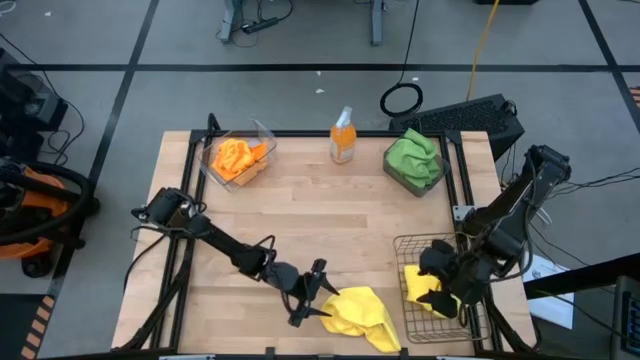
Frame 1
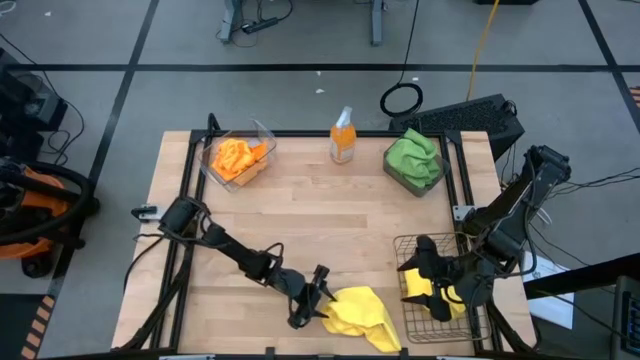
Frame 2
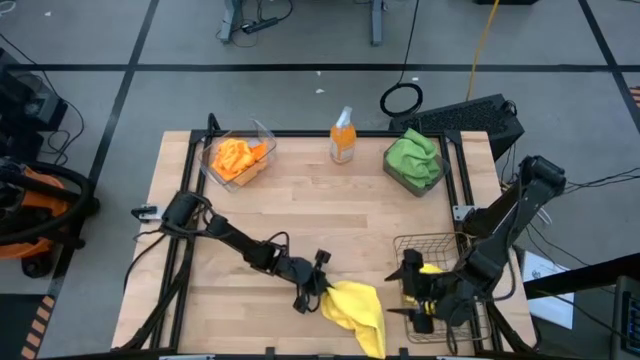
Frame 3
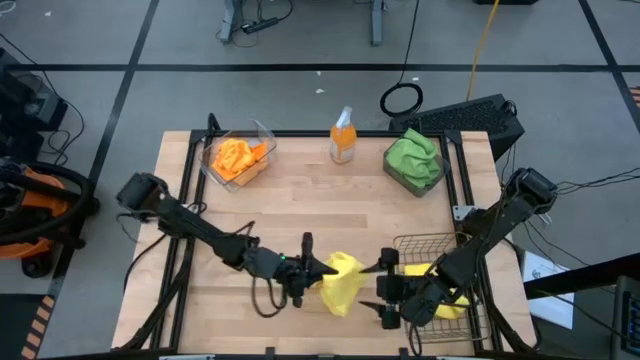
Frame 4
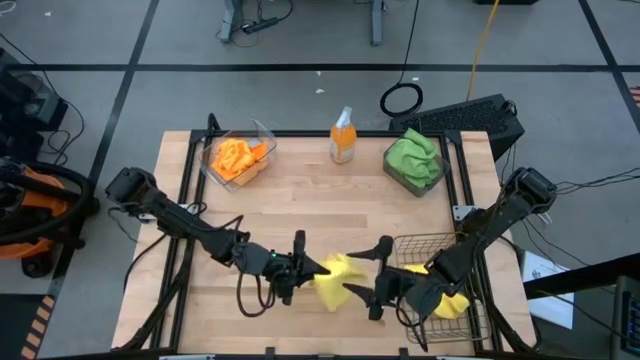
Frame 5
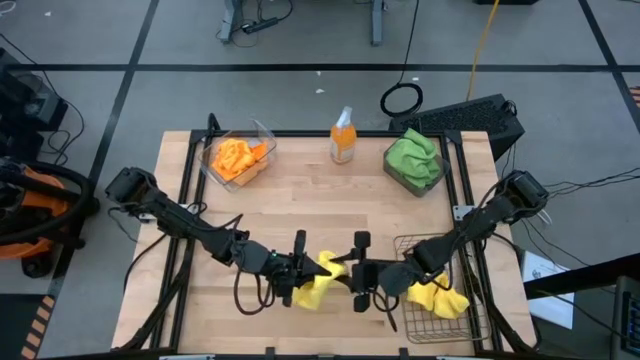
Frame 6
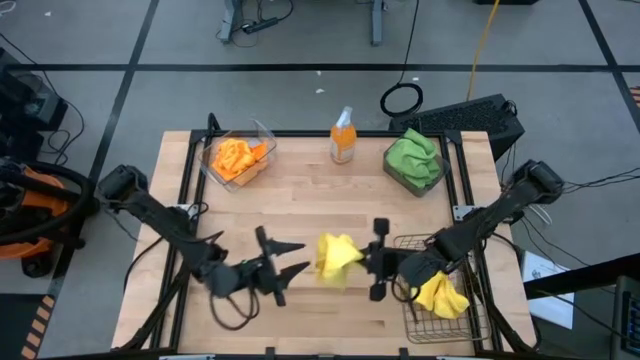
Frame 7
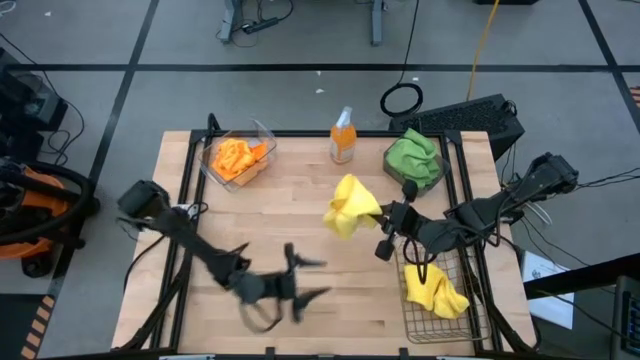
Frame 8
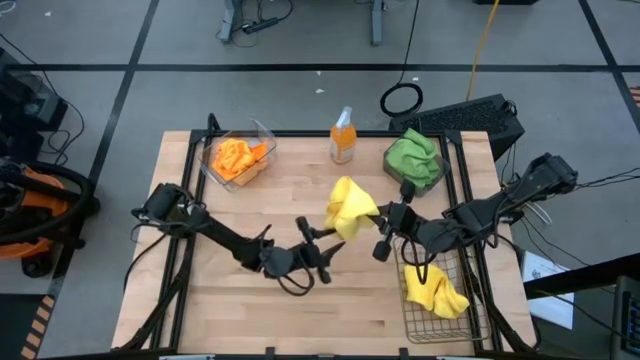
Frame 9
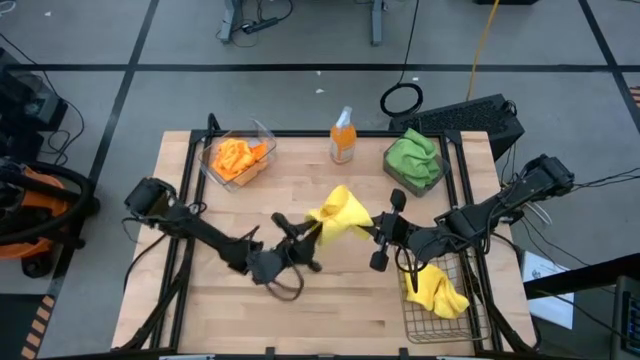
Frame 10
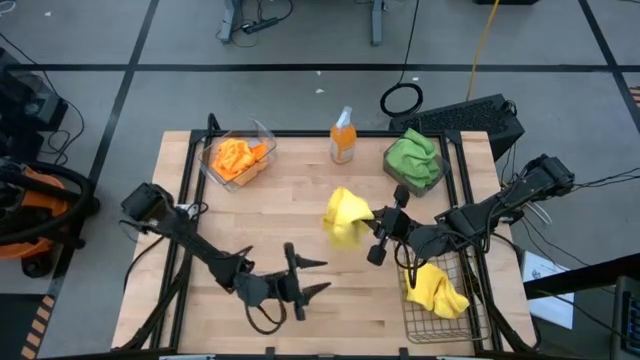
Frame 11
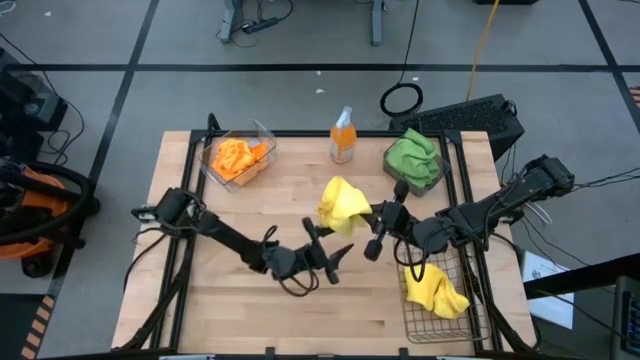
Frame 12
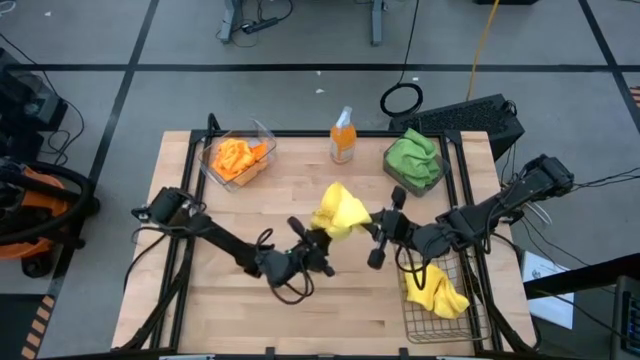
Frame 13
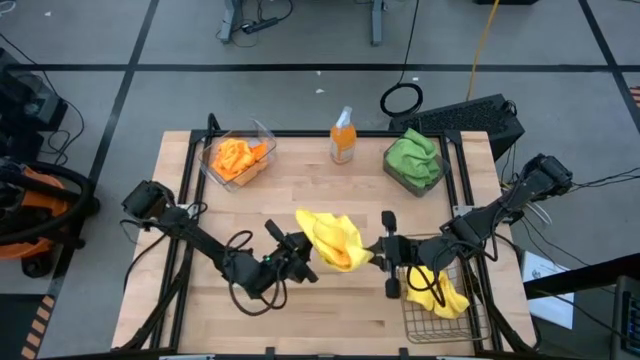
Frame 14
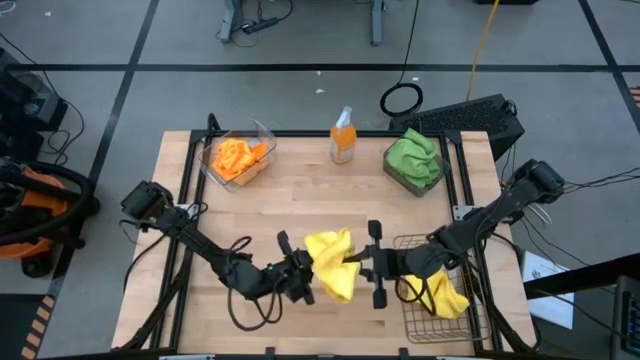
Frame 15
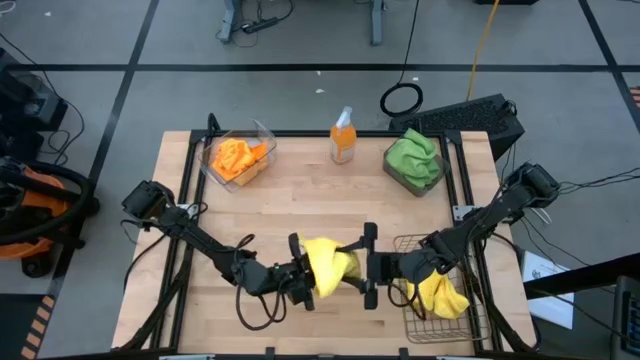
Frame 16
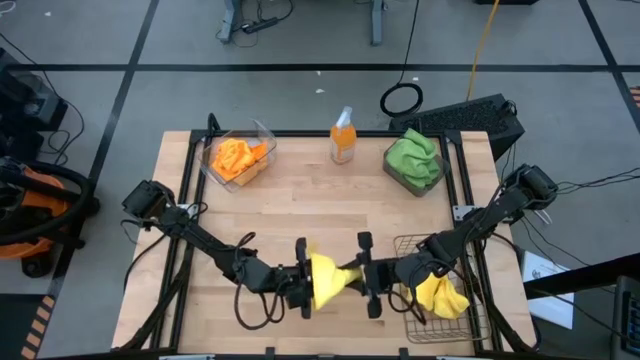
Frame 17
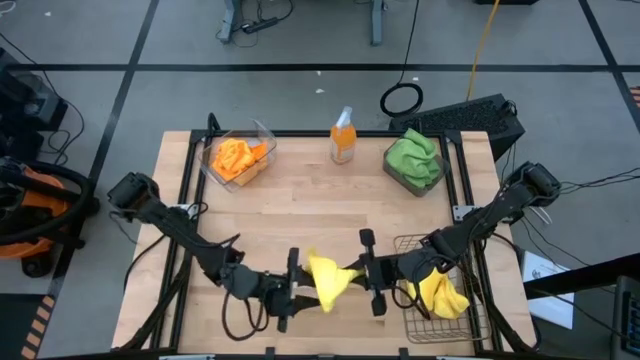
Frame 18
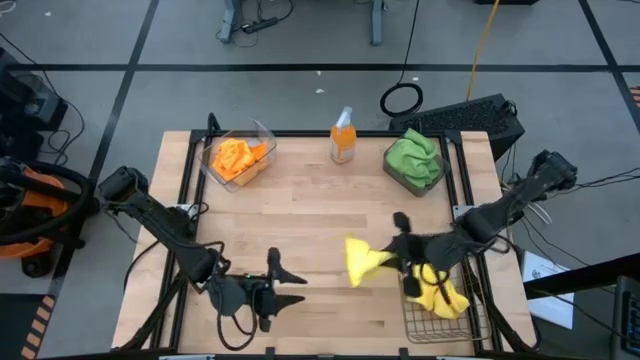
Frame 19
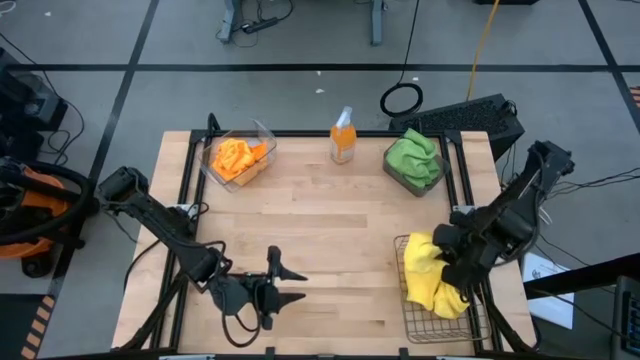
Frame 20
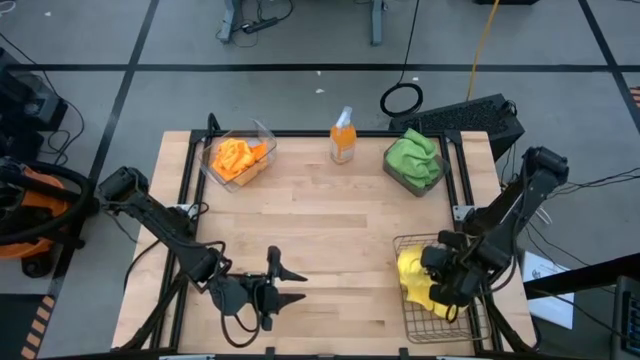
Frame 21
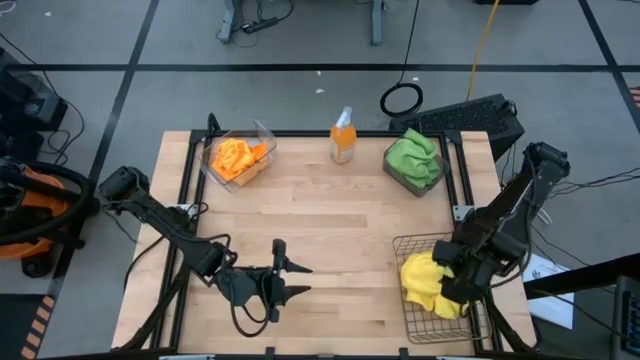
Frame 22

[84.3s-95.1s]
Task: Sort microfiber towel by color & place in baskets
Put the yellow microfiber cloth into the wire basket

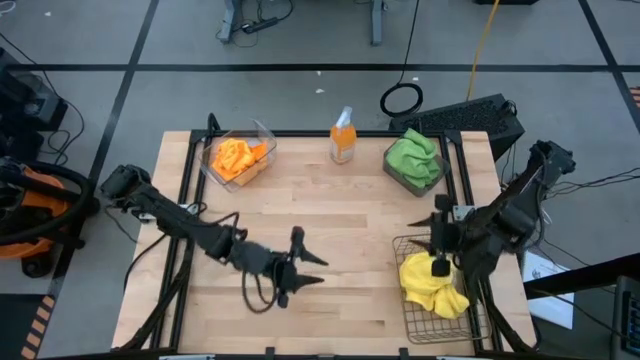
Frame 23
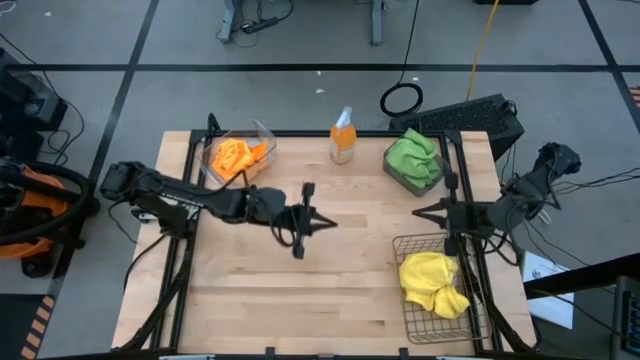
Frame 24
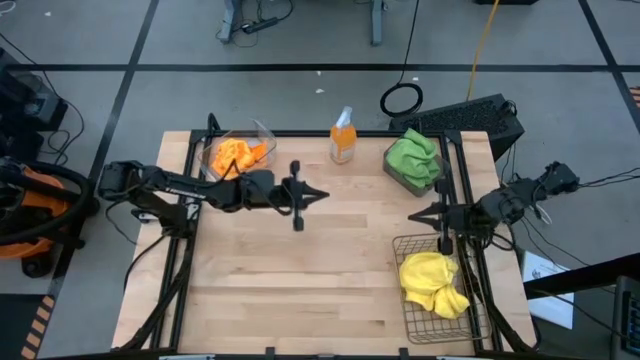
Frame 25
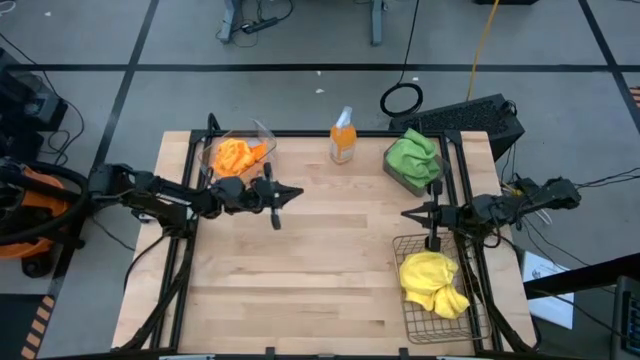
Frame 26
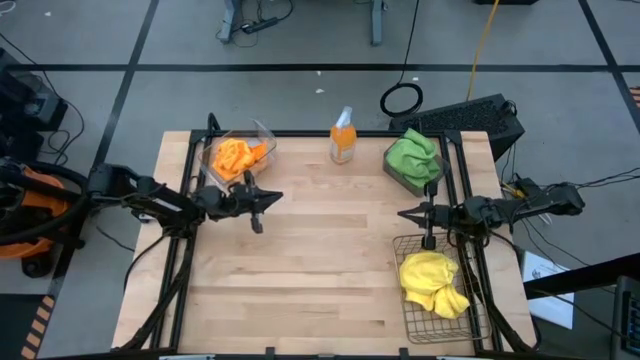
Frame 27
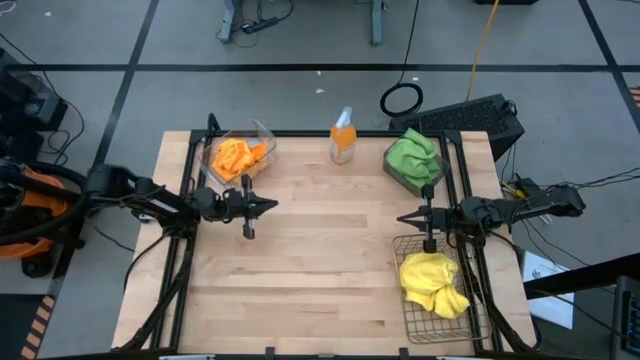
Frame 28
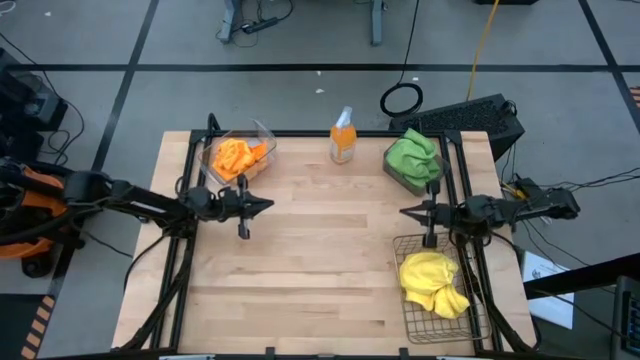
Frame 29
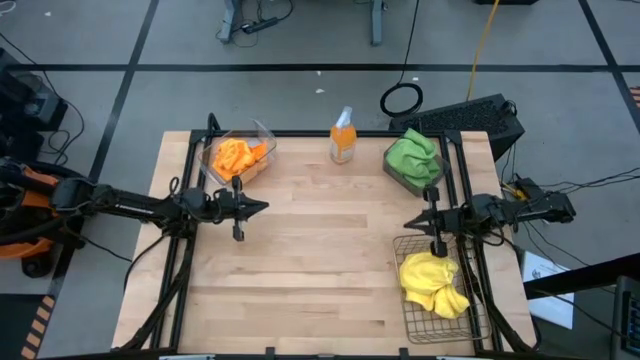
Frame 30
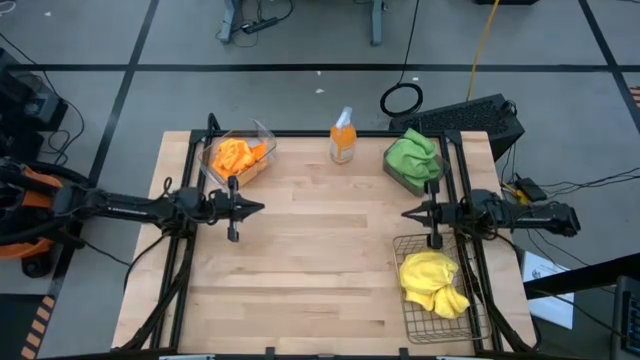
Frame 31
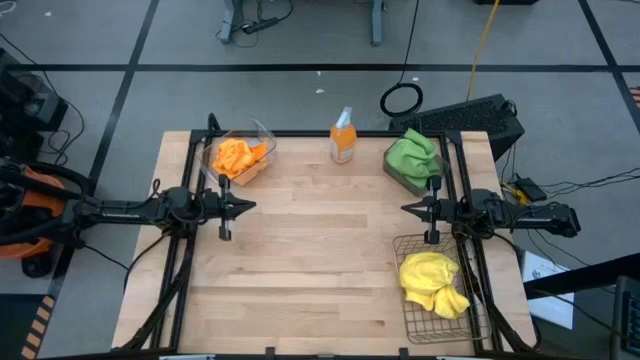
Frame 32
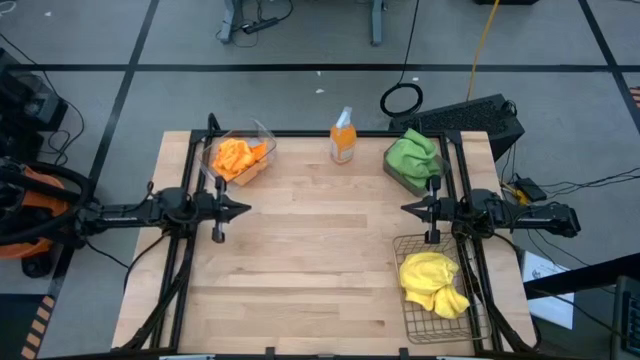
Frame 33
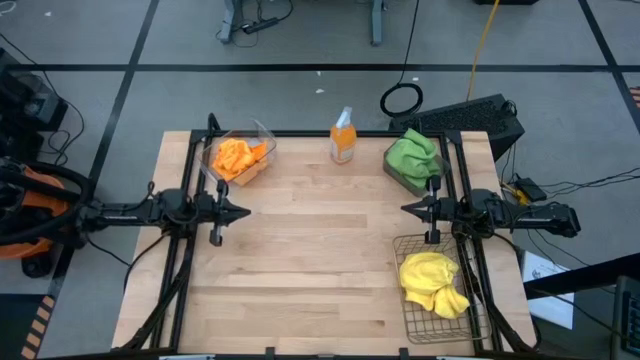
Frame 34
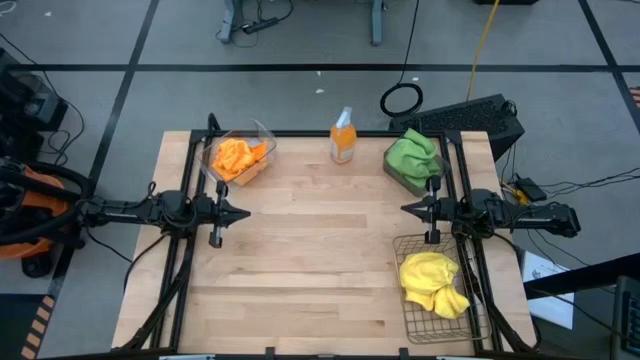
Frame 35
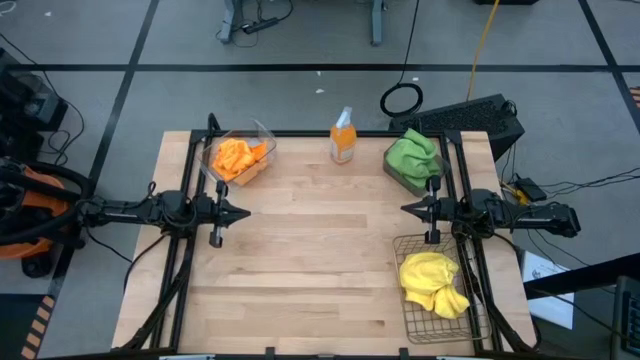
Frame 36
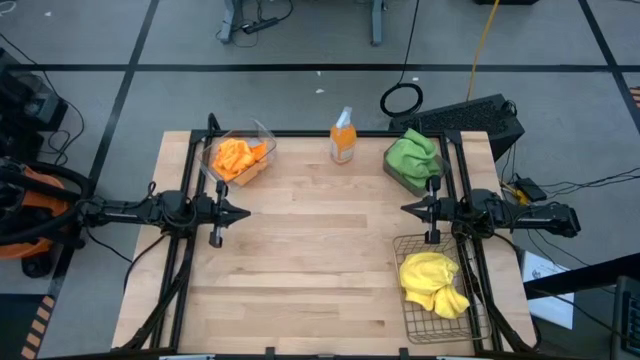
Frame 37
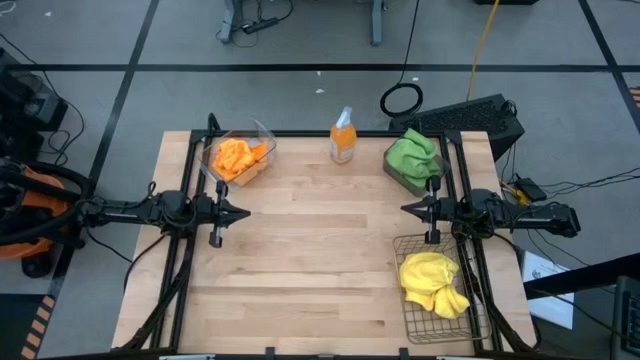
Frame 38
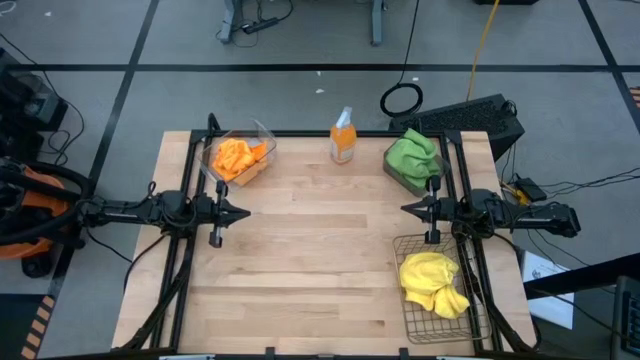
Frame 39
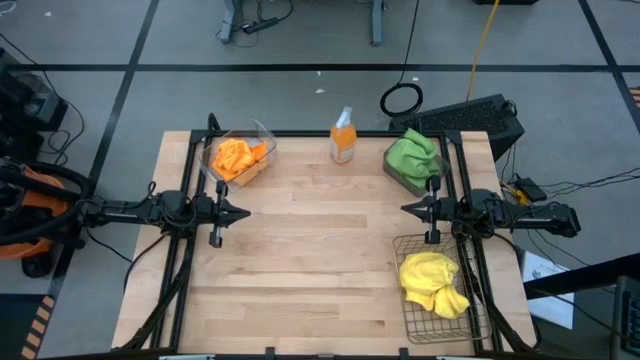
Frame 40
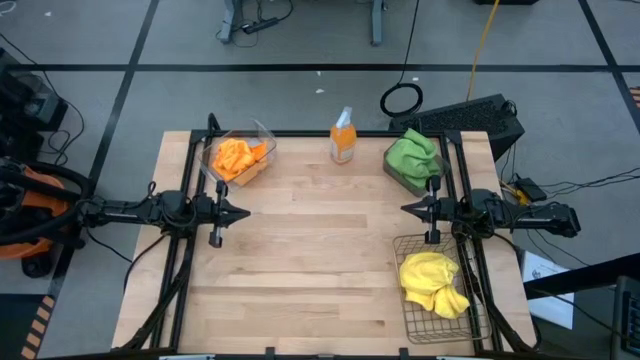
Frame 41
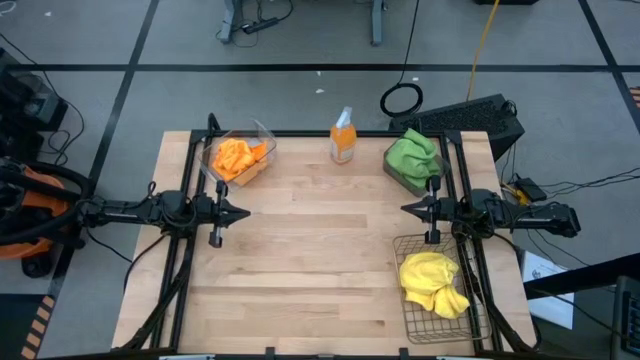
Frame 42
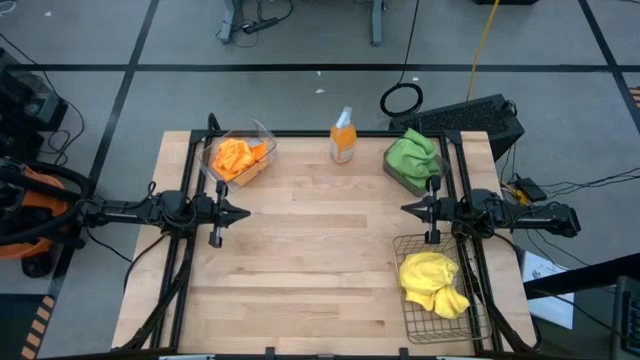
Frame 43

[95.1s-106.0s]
Return to Home Position
